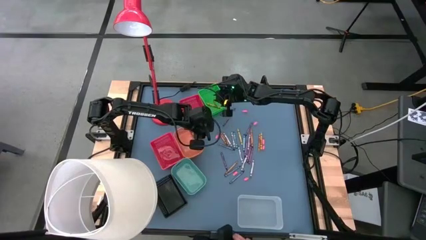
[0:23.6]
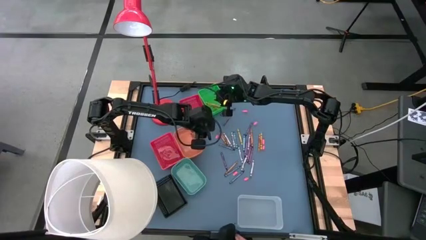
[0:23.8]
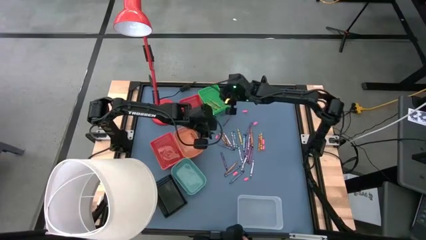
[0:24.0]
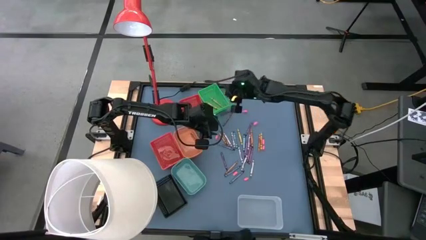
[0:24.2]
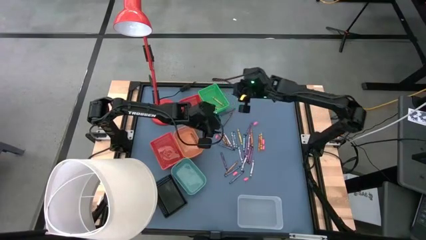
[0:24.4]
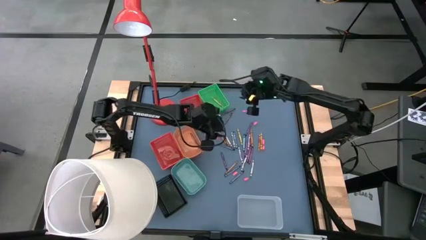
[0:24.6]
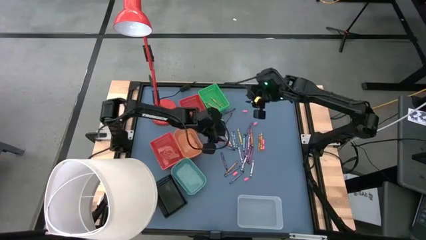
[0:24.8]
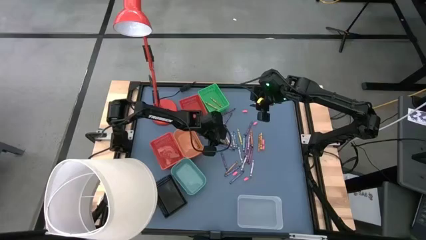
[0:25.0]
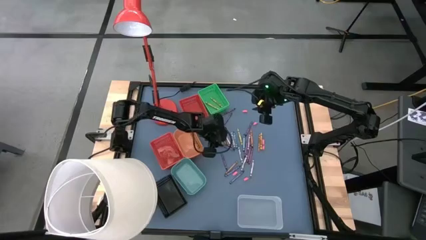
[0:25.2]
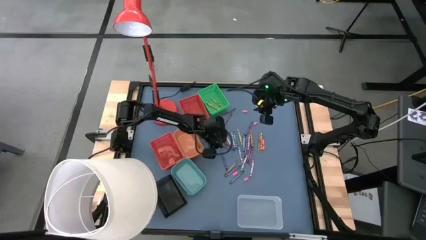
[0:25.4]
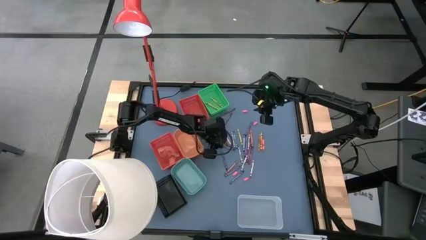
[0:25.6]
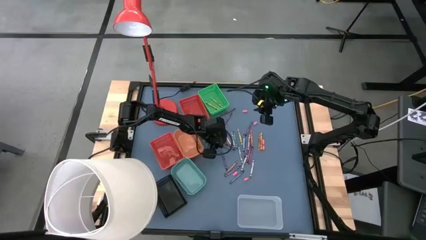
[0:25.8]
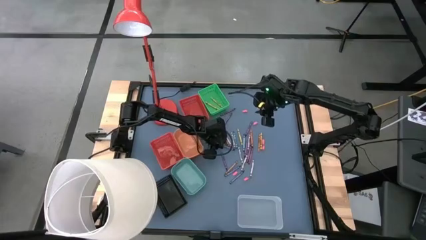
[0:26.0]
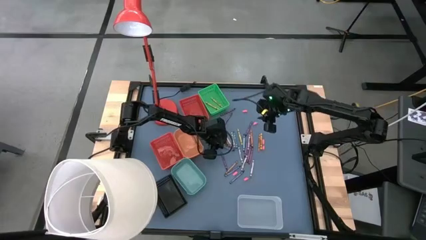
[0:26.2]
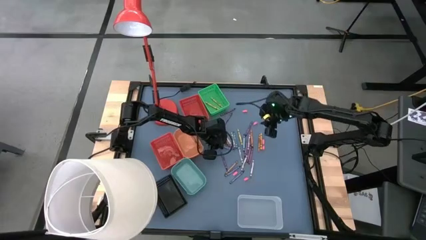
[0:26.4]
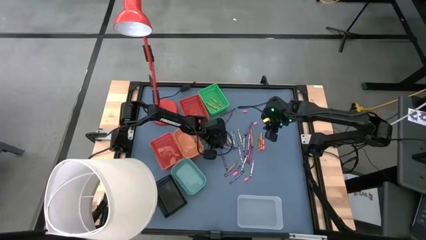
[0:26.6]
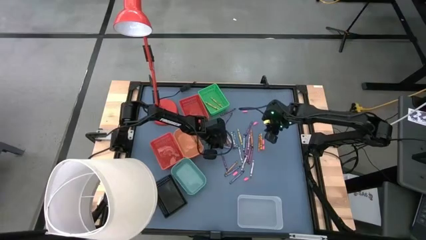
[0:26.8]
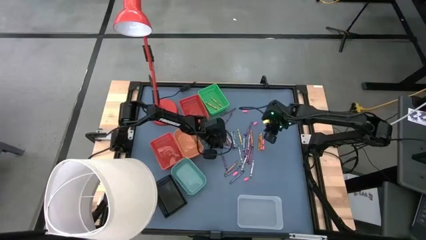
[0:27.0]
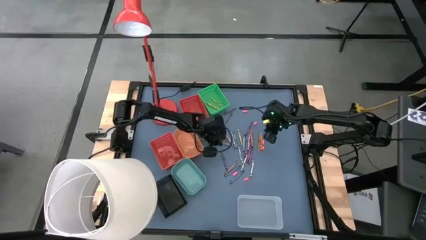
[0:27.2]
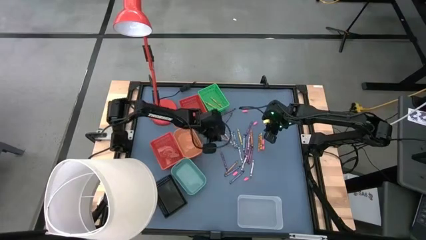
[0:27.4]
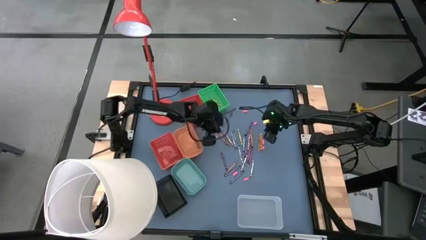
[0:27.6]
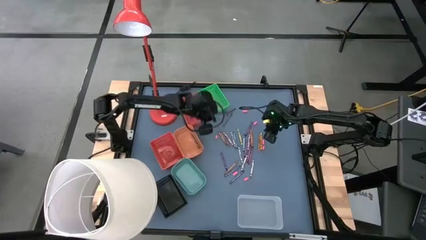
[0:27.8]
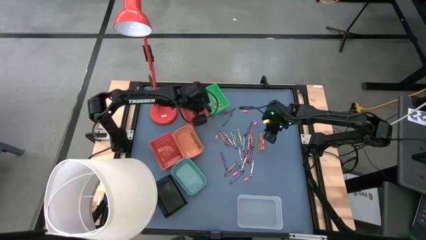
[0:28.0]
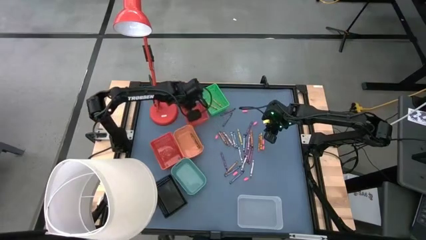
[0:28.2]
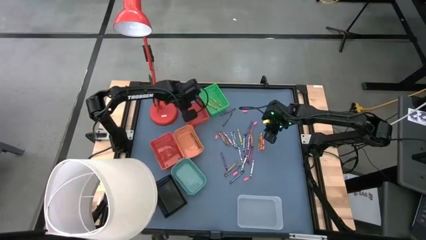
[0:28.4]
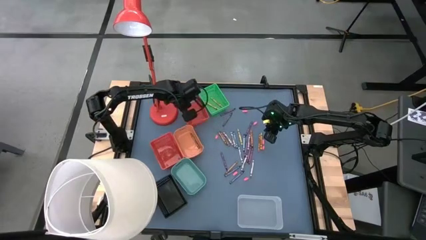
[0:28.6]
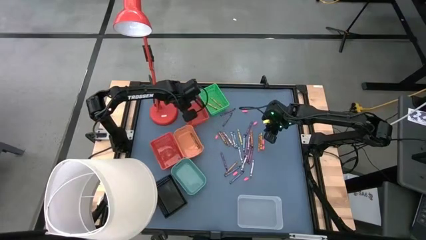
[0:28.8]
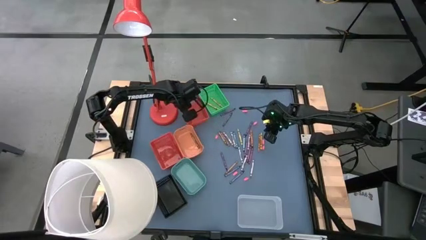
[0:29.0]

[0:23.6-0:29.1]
Task: Sort crayons
Put the blue crayon into the right red basket

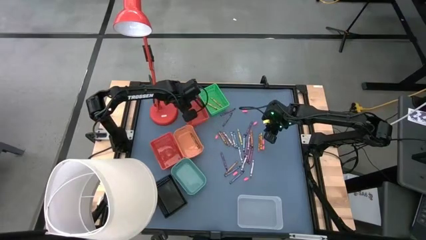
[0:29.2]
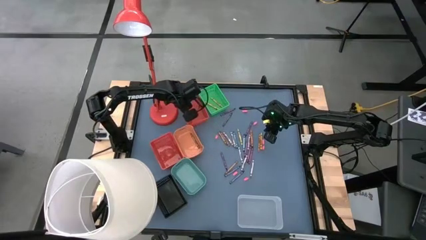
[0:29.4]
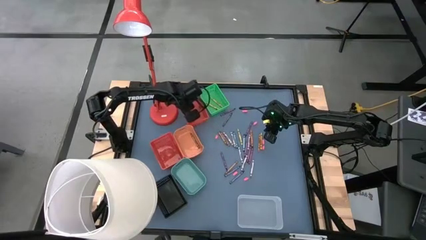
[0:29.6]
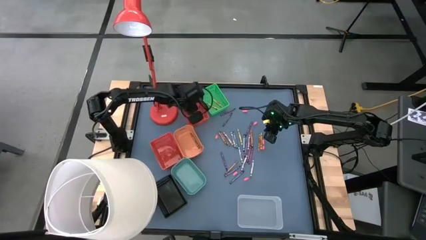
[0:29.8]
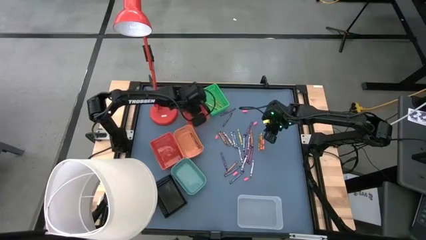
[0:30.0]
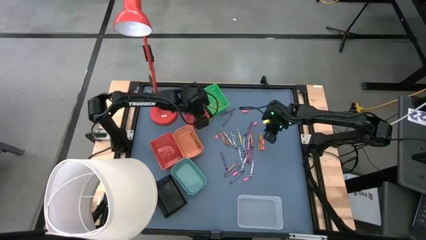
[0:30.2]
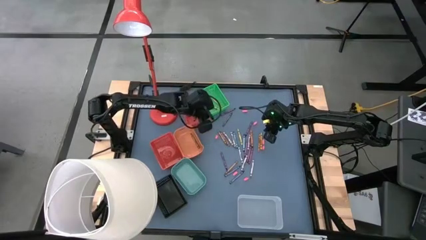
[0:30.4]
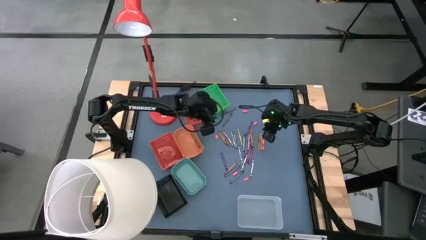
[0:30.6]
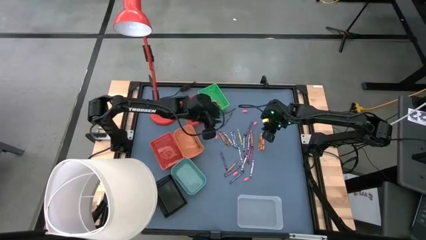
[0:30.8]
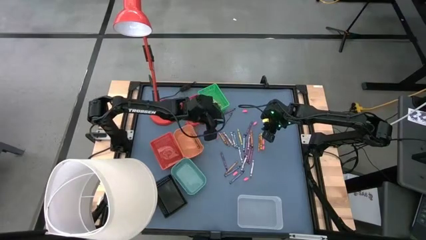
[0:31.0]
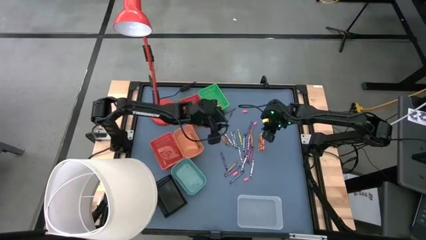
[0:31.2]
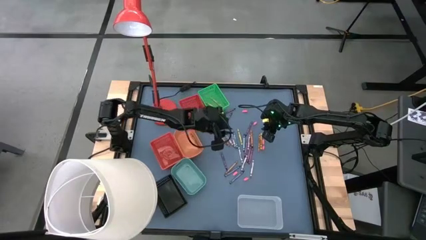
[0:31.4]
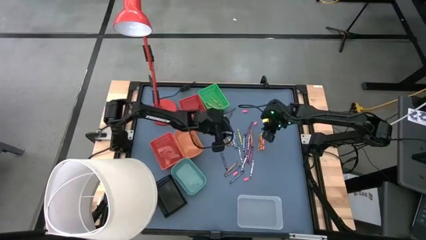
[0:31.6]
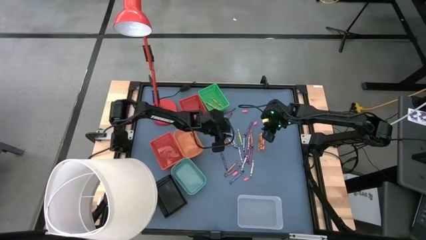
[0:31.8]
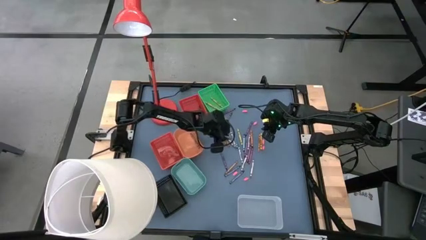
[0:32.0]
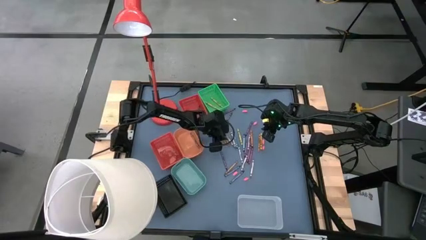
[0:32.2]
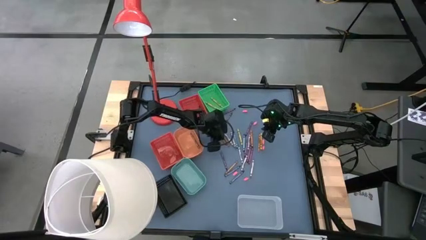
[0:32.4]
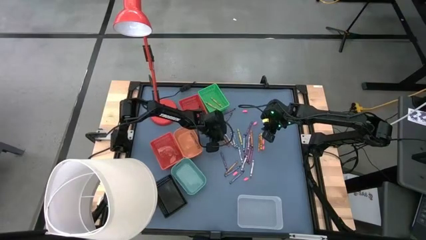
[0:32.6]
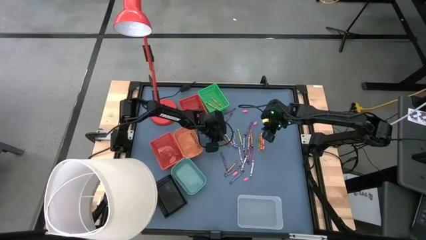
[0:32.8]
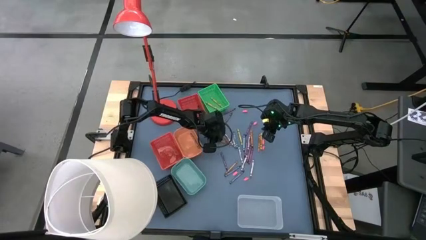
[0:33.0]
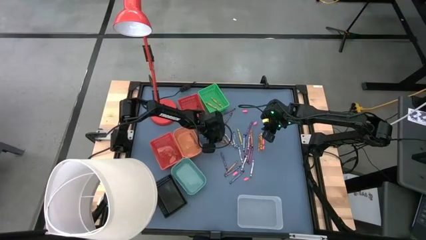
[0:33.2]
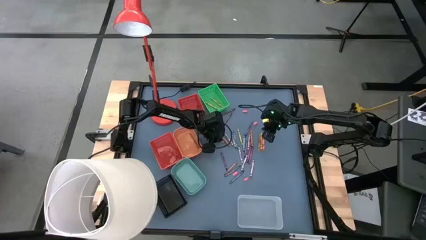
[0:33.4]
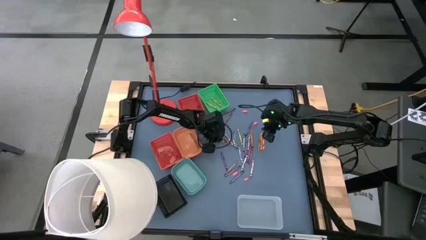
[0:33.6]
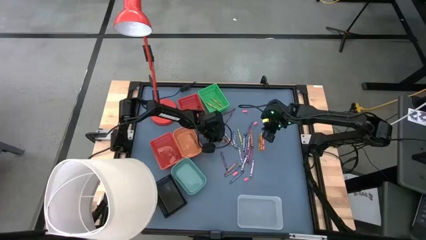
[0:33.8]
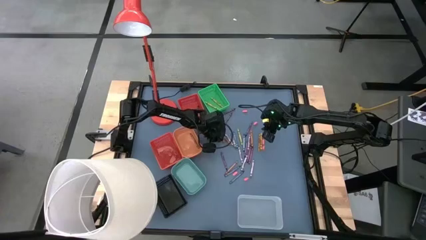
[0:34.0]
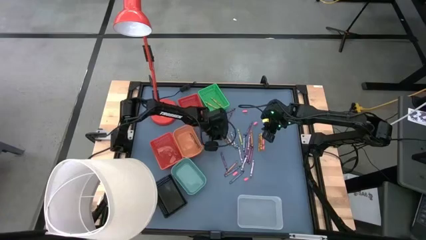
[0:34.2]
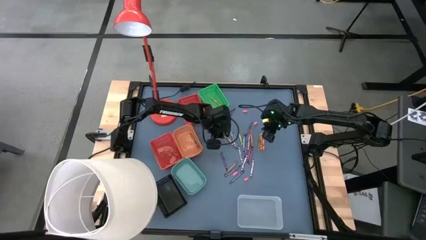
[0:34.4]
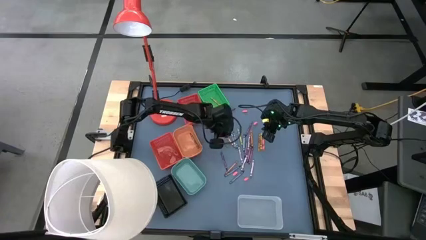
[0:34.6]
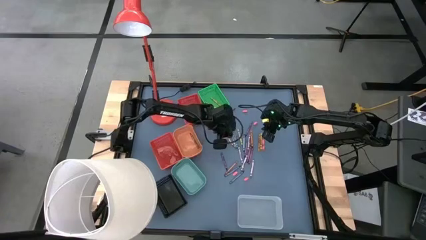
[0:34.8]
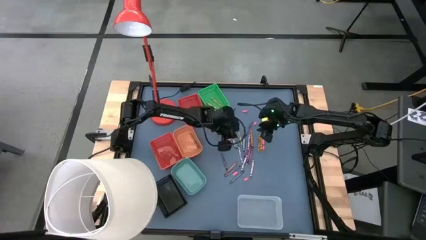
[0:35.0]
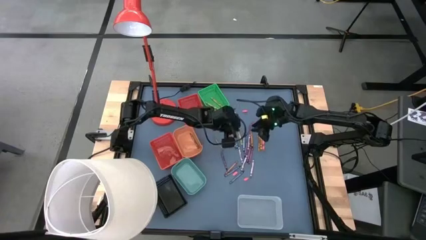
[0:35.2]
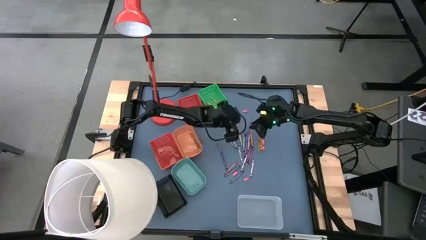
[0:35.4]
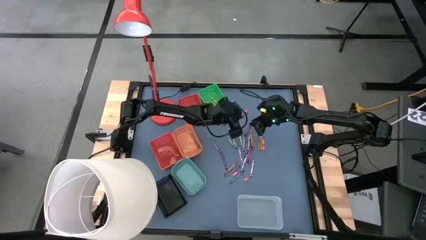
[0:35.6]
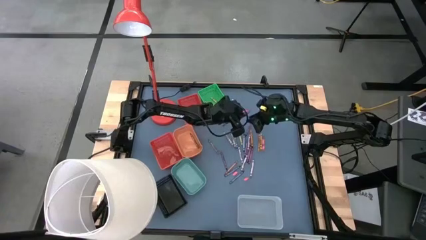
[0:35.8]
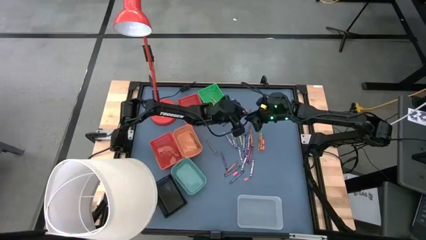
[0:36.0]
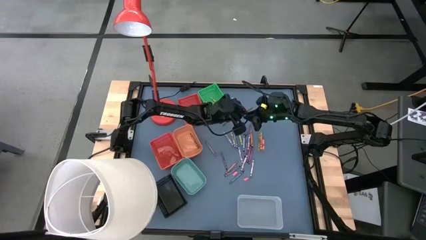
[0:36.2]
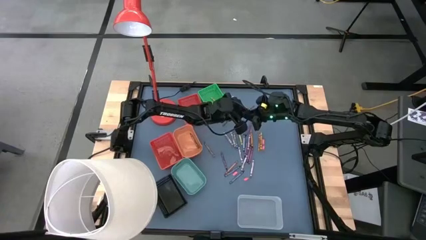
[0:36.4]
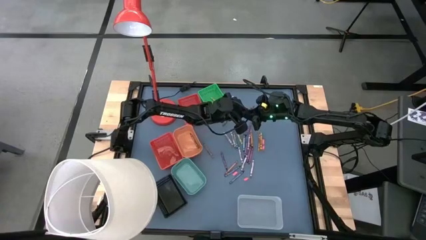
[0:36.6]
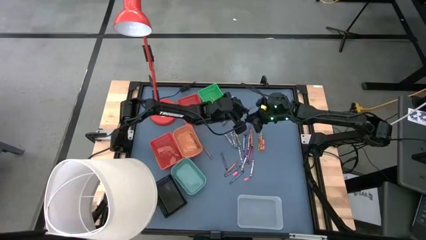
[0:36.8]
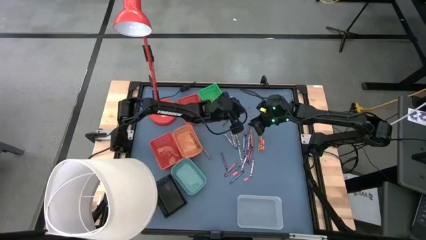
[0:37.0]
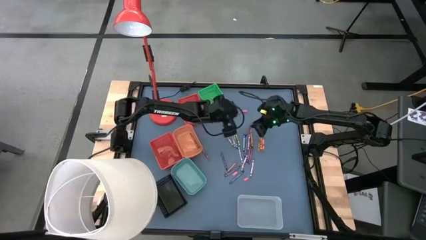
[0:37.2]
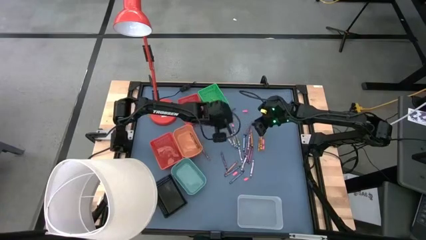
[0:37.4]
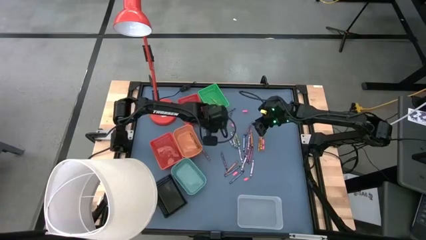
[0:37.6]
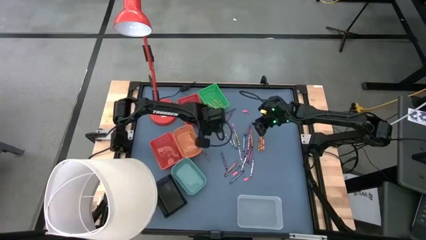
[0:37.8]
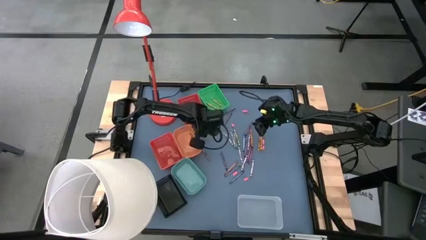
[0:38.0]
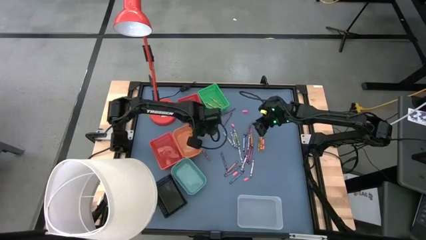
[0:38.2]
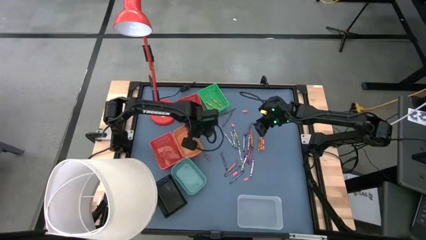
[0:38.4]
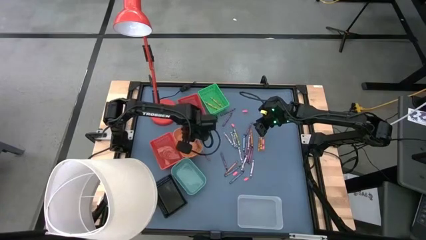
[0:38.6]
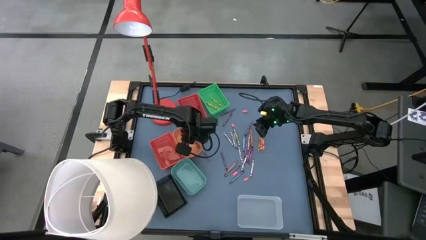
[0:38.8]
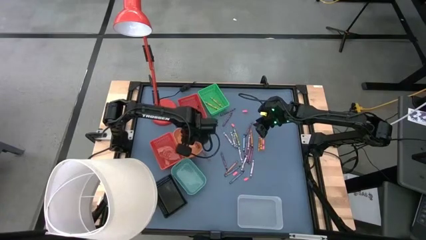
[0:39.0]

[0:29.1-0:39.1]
Put the brown crayon into the orange bin
